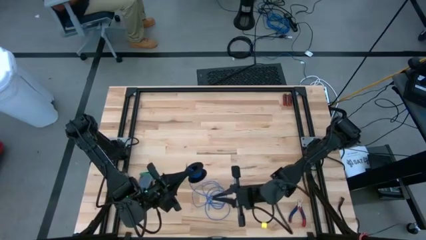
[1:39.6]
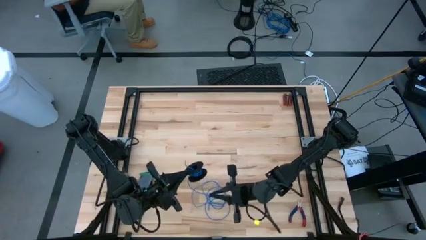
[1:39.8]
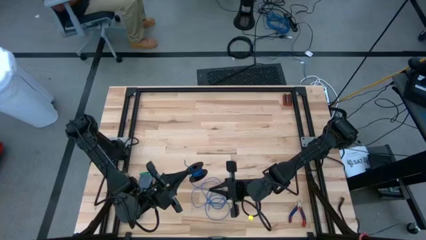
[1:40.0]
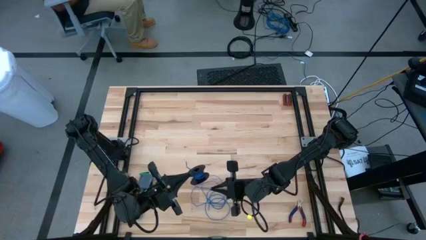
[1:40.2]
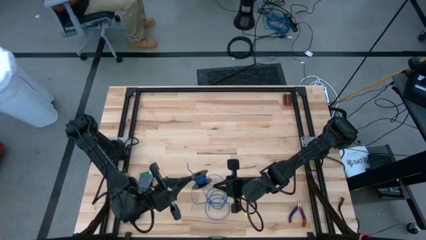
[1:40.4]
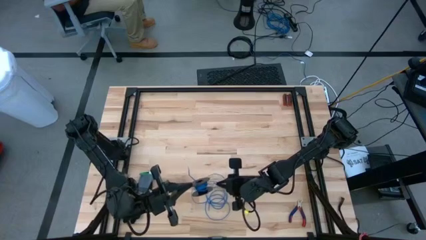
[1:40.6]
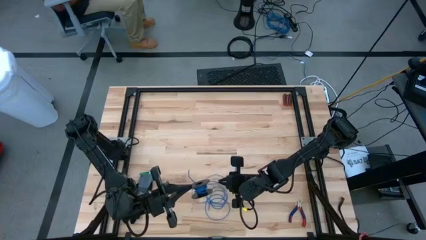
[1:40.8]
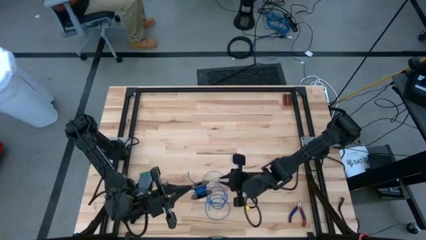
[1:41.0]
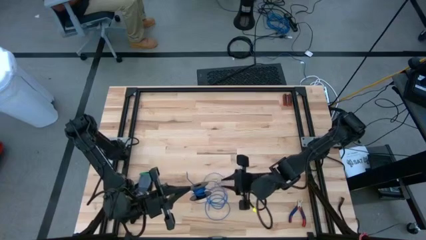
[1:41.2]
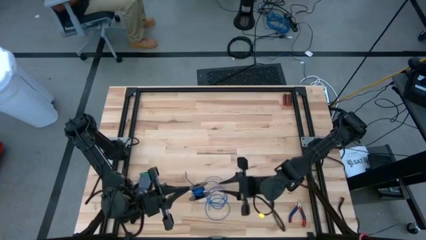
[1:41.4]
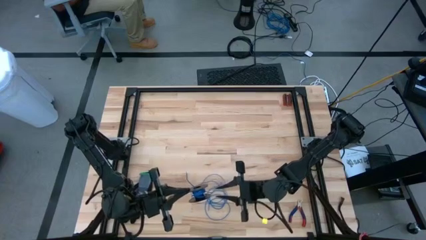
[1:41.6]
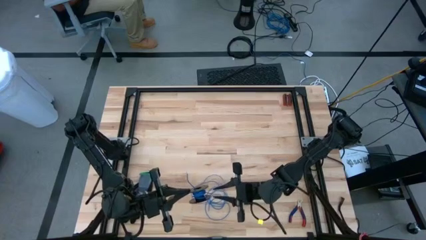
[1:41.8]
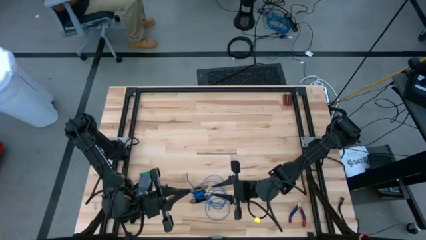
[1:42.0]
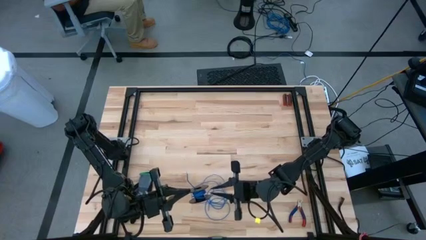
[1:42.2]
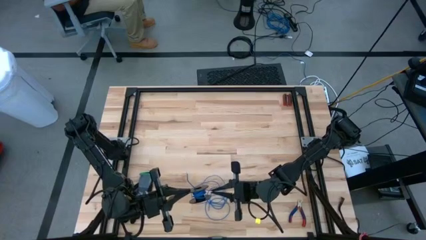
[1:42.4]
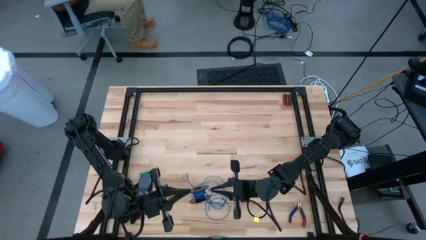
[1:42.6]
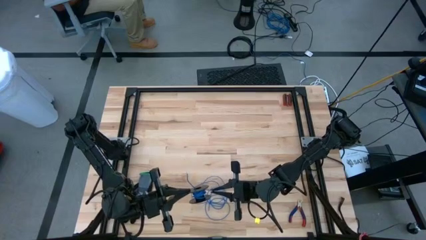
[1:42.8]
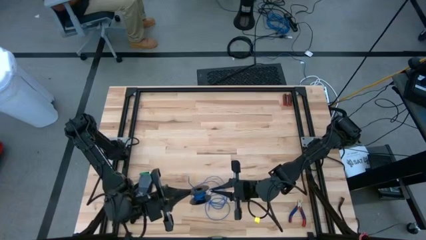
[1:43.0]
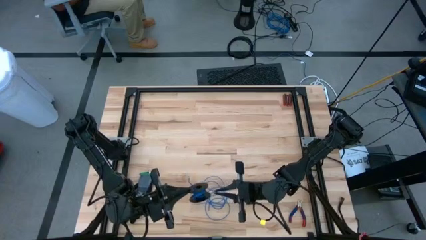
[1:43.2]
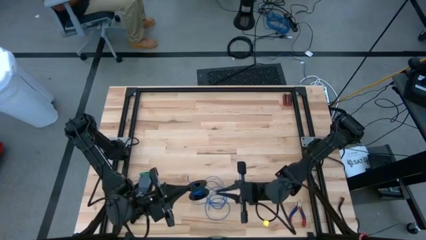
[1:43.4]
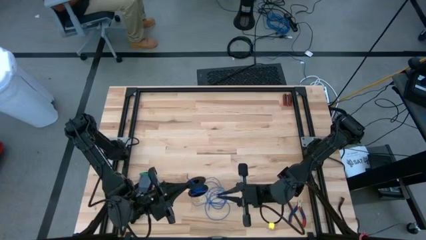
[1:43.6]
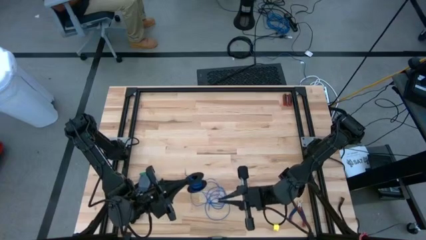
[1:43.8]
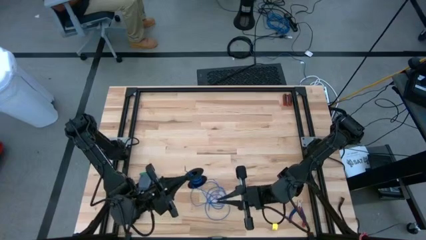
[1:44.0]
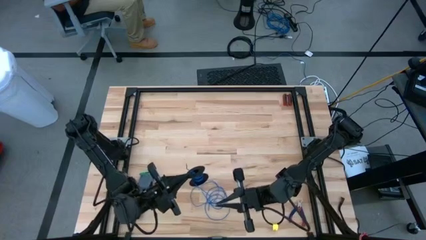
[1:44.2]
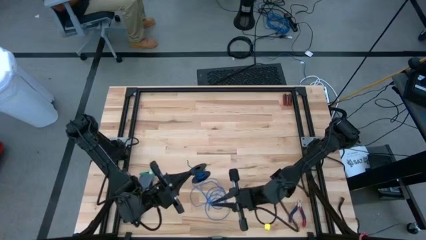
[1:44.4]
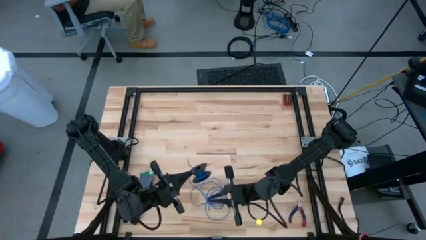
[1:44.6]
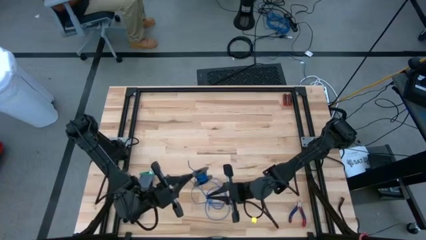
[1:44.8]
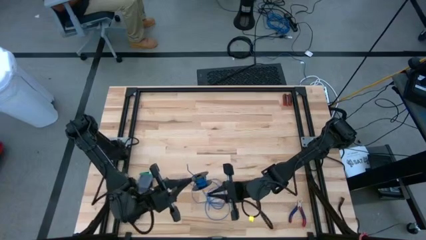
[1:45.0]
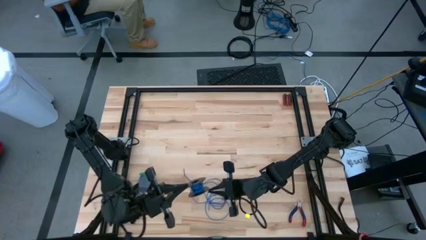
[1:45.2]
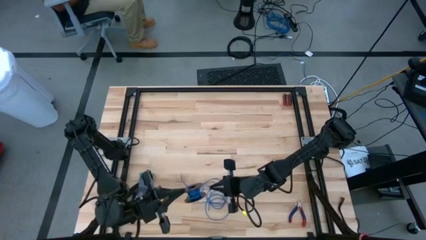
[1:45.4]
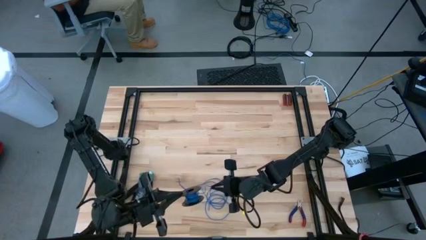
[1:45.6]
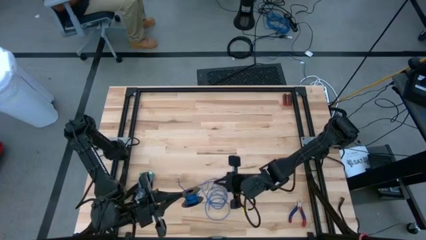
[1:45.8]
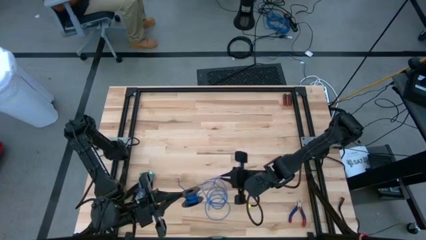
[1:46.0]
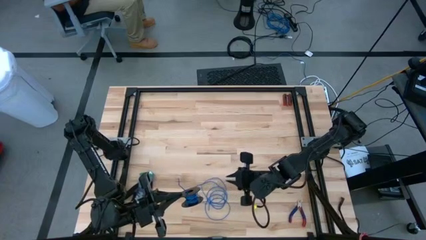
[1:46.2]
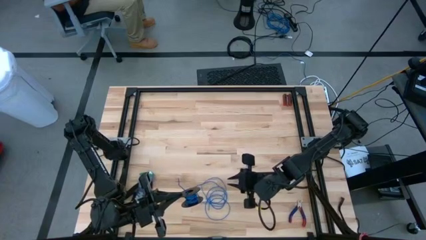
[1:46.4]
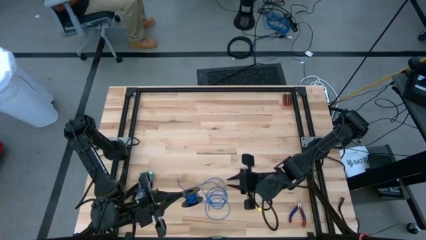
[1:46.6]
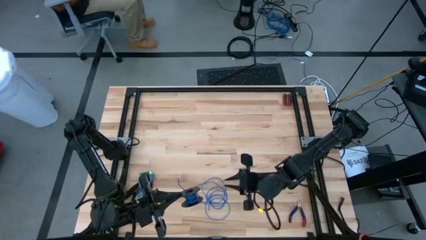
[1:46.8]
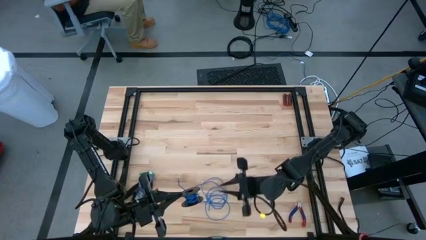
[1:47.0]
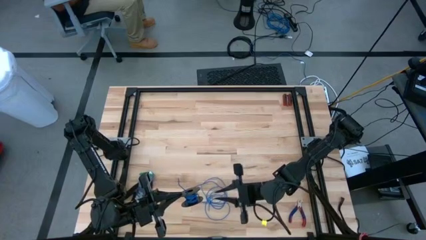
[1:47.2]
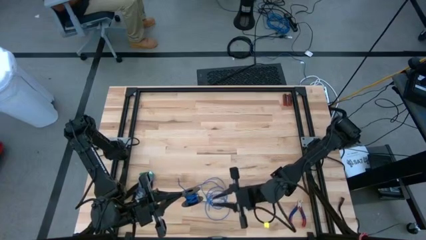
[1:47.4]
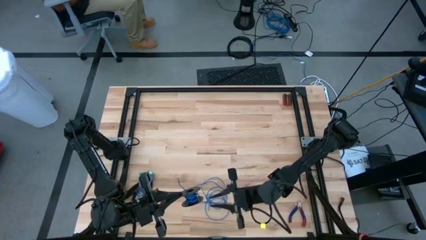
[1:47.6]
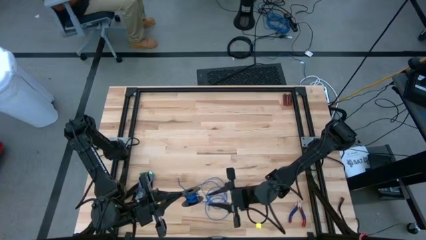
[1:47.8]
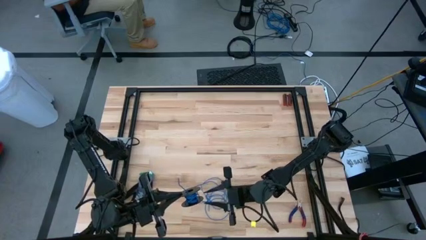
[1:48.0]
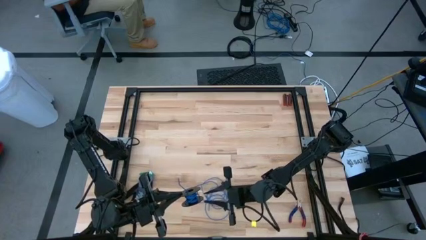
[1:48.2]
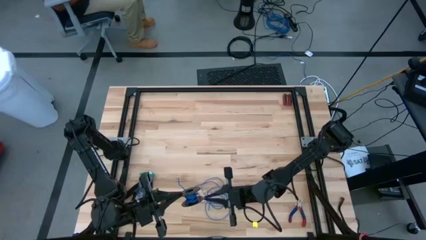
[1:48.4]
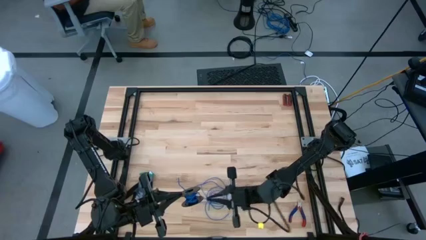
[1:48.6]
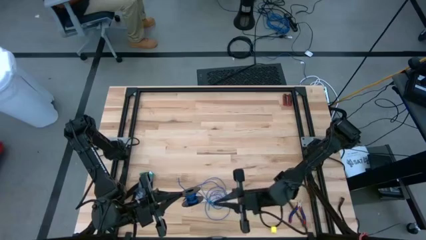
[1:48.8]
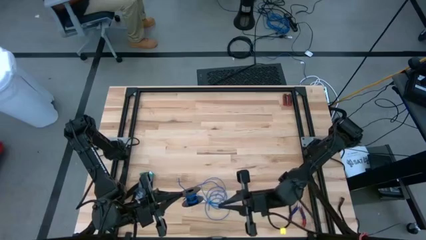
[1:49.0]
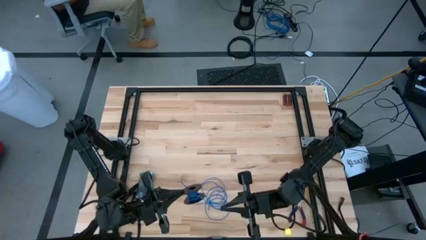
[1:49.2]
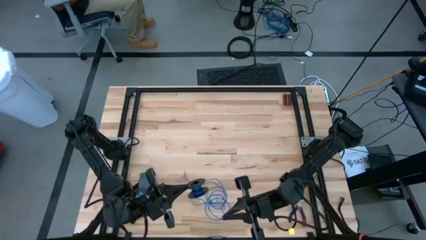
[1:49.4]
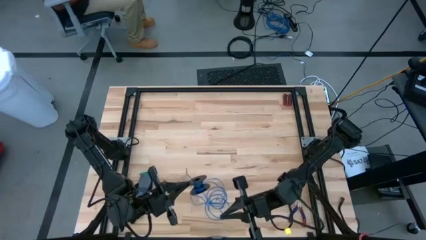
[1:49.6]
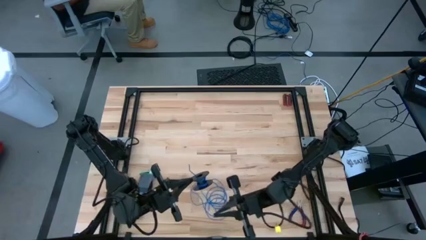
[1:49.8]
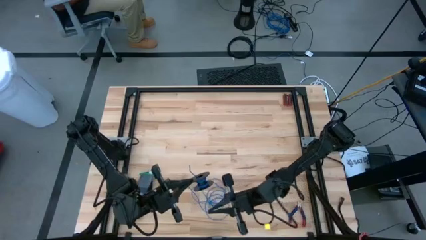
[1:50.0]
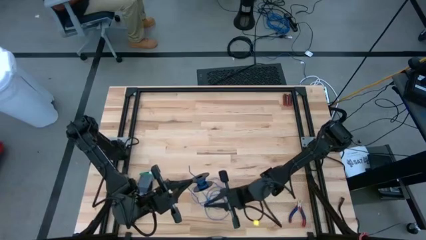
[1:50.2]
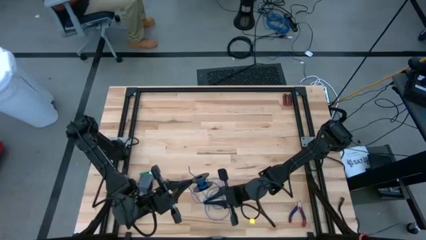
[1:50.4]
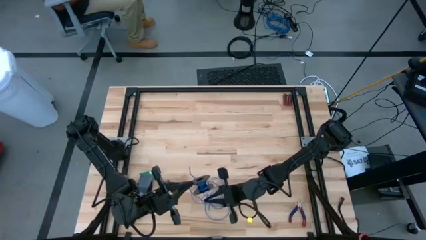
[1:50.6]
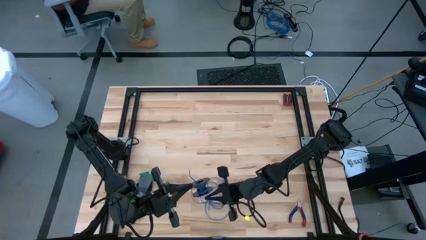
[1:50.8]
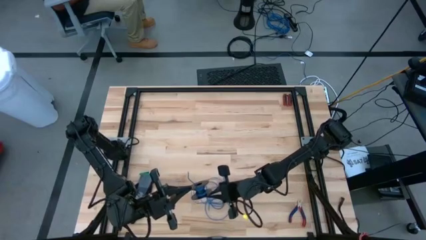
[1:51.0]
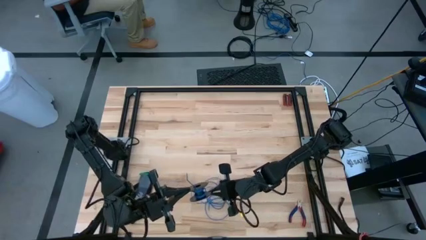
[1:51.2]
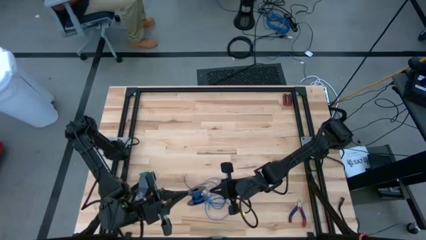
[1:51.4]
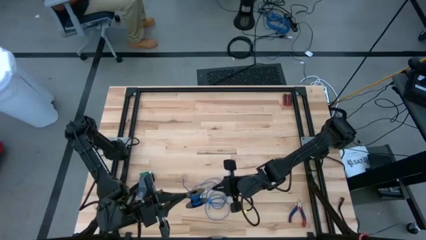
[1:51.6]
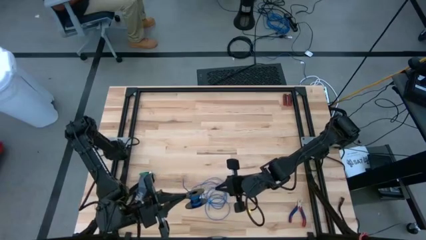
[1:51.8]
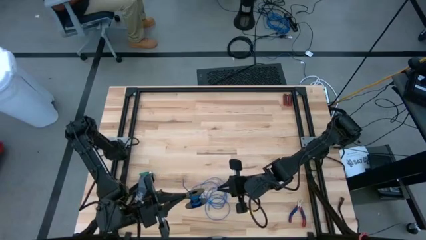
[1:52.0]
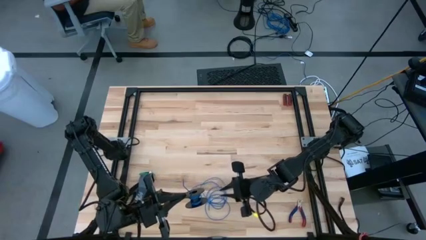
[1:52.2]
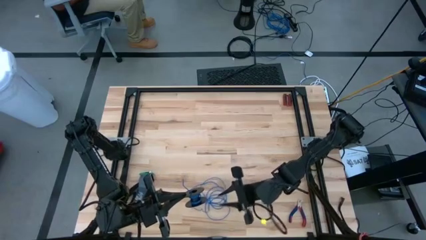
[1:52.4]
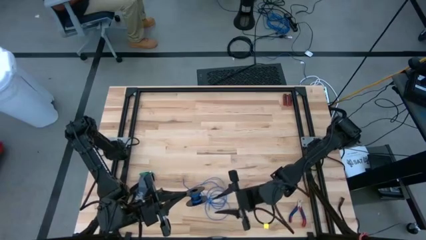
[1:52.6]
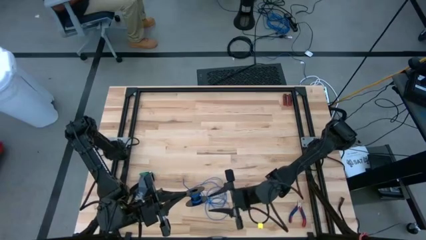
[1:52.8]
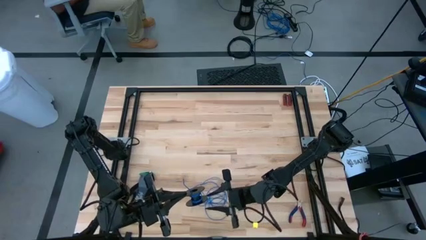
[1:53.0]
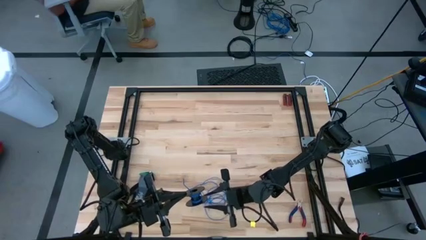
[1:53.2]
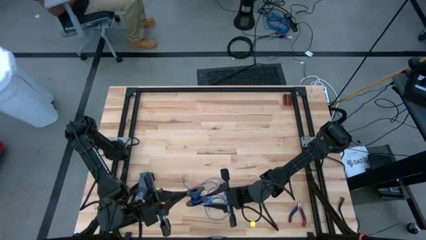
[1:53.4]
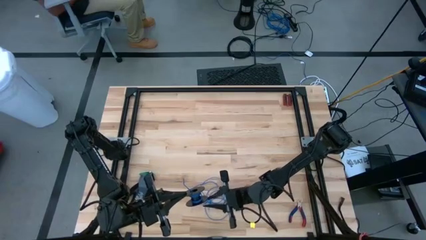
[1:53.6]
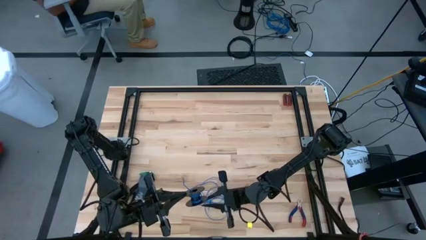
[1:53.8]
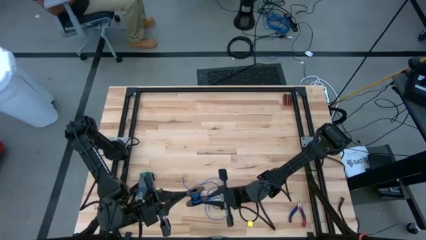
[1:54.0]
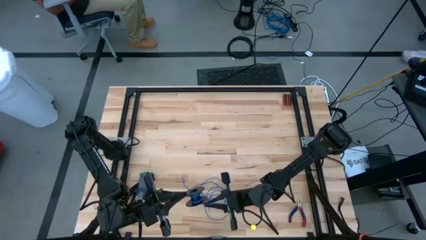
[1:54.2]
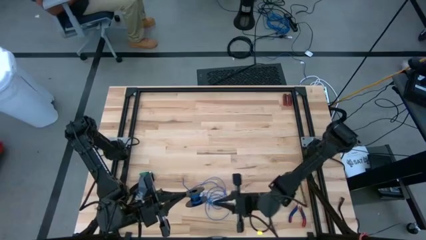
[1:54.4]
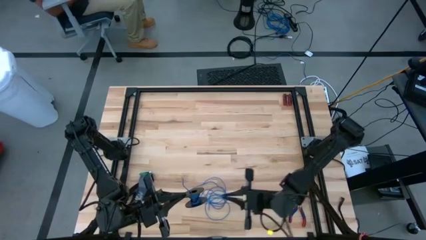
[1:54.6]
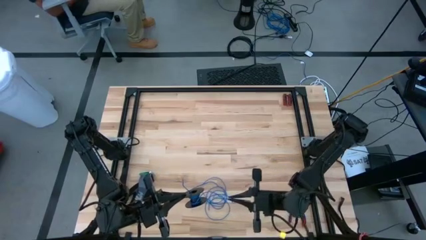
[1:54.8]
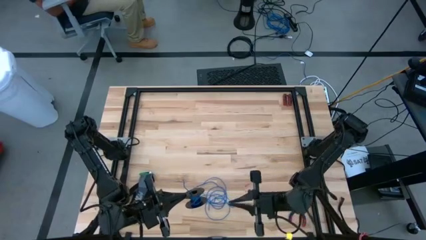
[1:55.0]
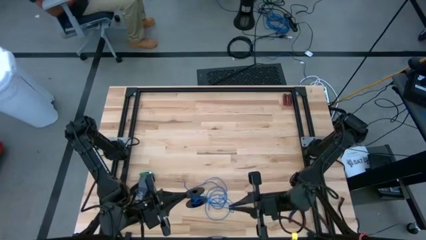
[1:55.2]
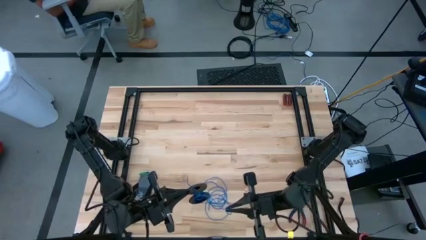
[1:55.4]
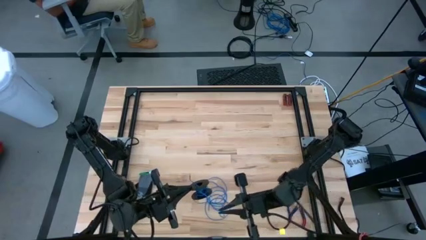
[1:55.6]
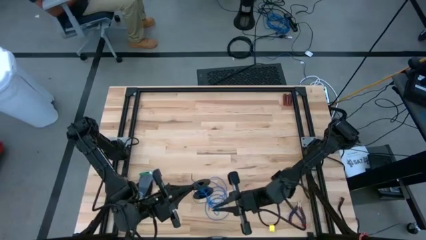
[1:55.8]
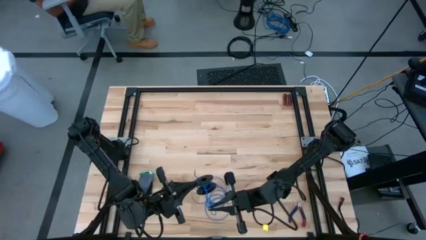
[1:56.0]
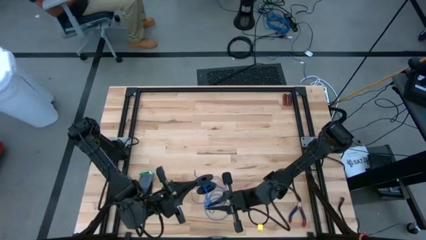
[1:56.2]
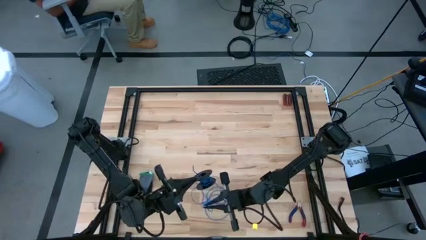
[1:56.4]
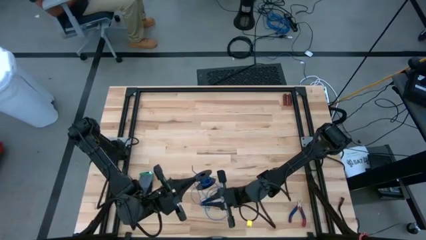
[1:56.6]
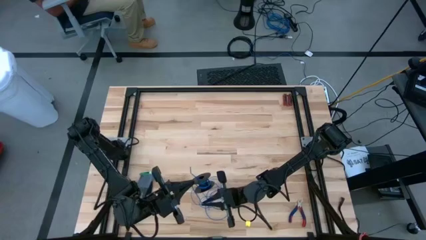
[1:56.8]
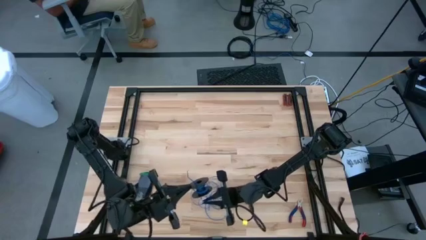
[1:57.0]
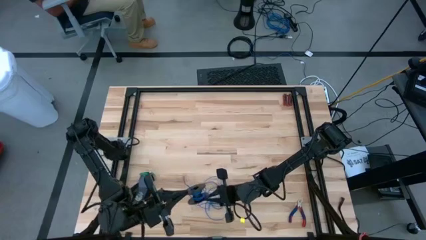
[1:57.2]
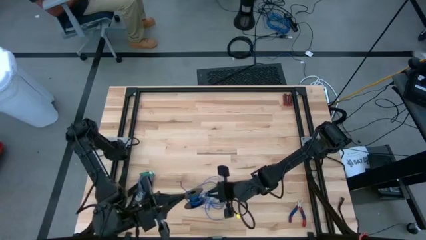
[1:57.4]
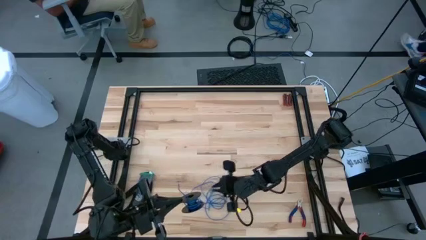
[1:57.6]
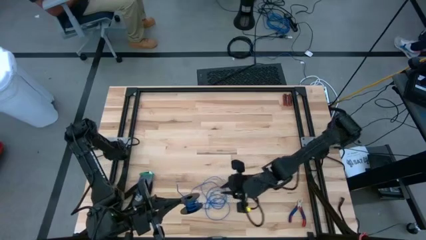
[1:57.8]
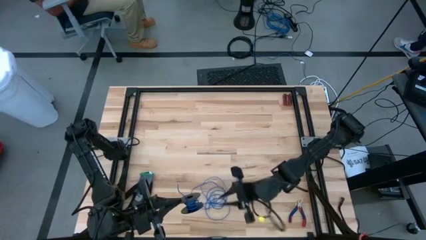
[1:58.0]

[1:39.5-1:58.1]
Task: Coil cords
Uncoil the blue wire from the spool
